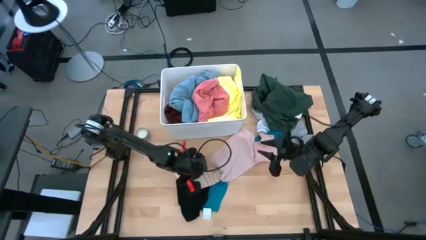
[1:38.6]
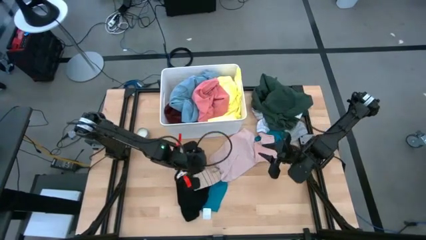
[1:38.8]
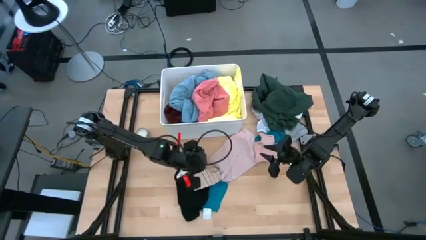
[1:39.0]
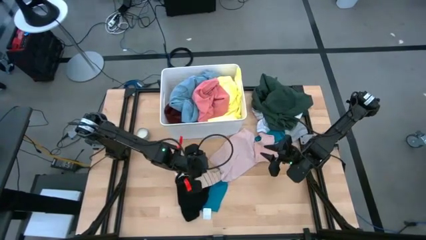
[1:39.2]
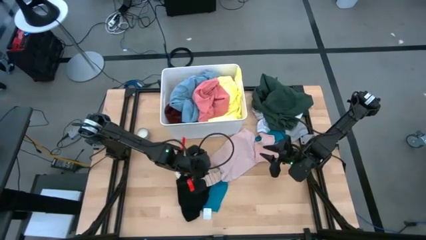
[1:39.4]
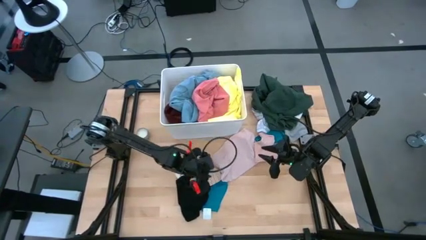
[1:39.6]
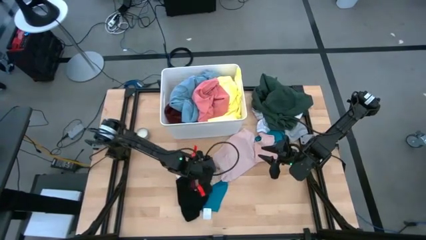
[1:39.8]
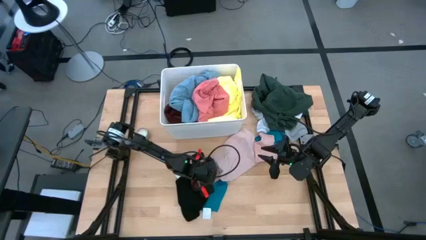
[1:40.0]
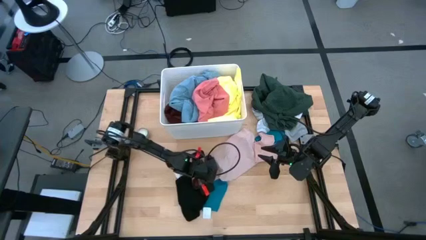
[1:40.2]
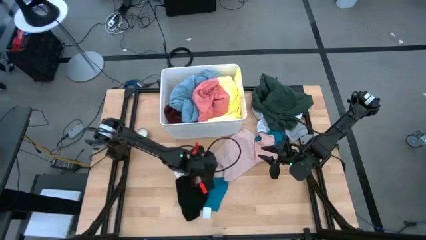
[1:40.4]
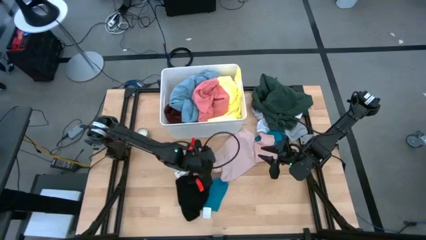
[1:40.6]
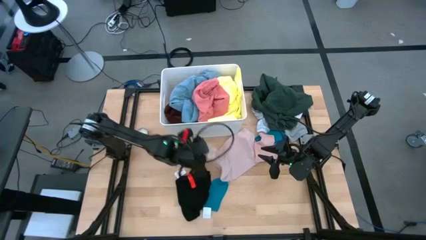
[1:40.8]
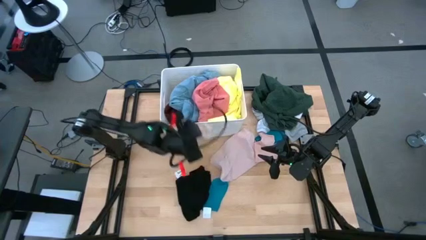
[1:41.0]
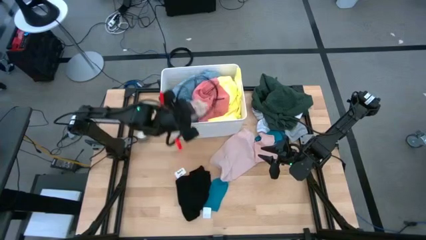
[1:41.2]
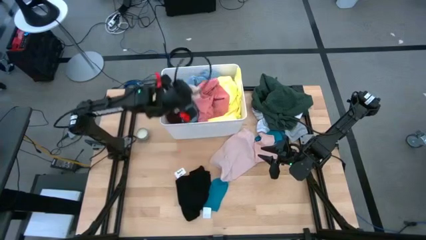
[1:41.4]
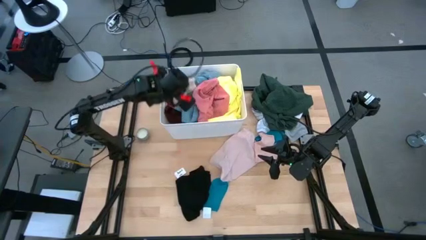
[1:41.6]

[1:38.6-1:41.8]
Task: Sort clothes
Put the brown patterned sock into the laundry bin

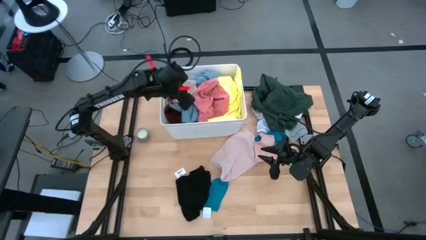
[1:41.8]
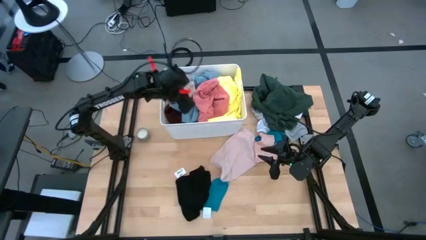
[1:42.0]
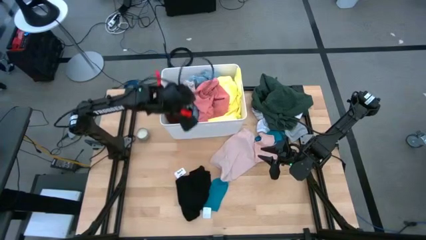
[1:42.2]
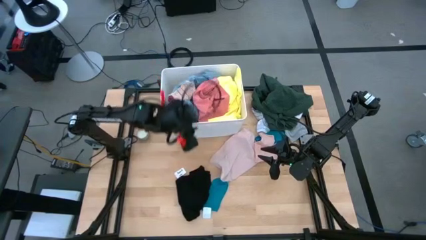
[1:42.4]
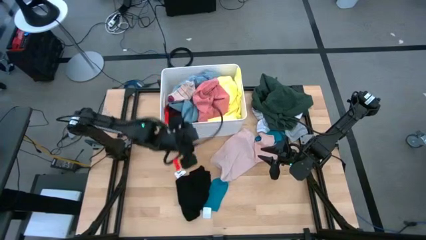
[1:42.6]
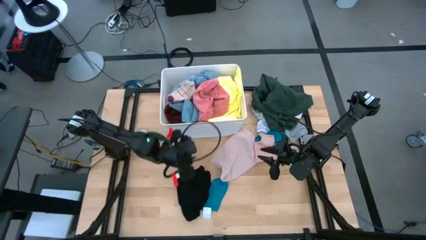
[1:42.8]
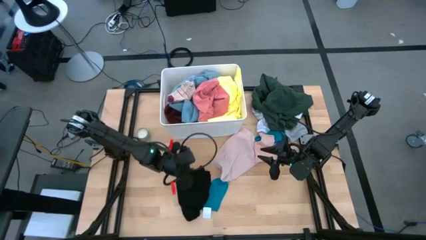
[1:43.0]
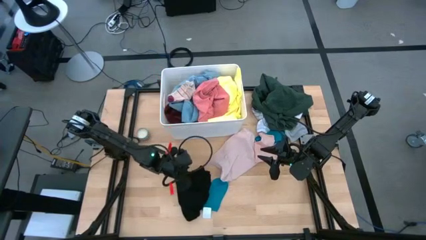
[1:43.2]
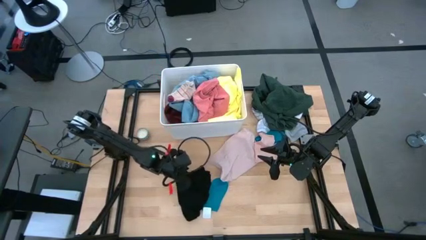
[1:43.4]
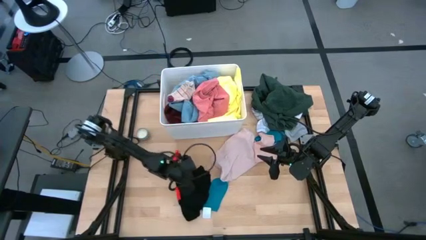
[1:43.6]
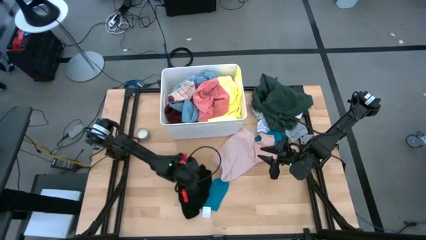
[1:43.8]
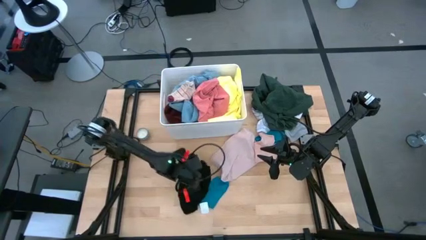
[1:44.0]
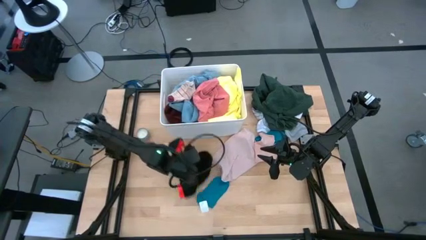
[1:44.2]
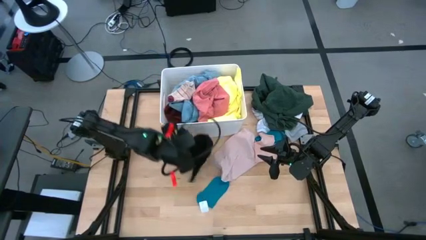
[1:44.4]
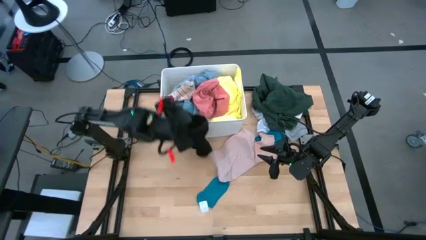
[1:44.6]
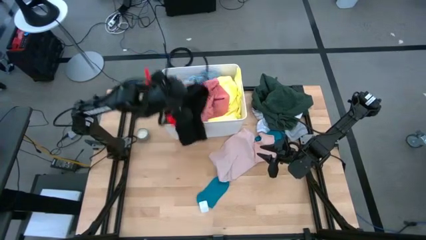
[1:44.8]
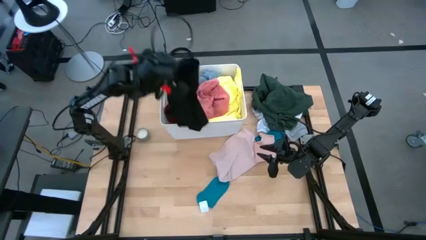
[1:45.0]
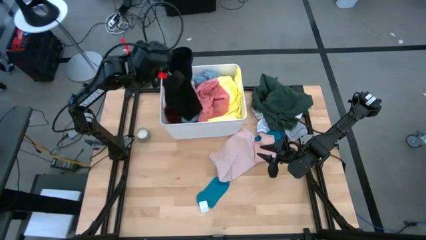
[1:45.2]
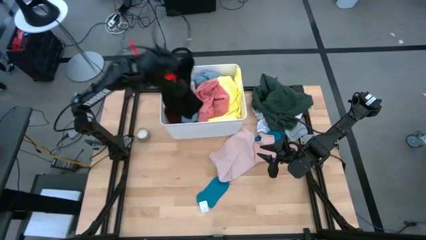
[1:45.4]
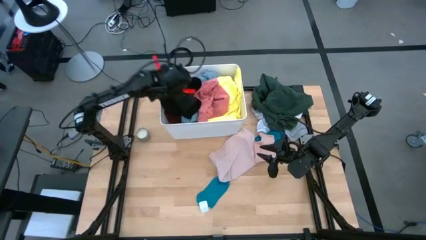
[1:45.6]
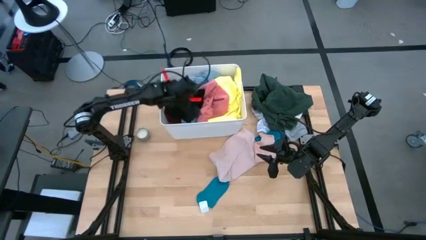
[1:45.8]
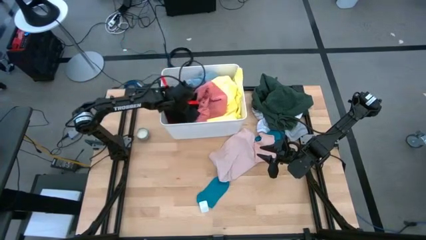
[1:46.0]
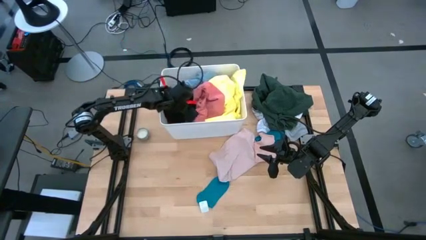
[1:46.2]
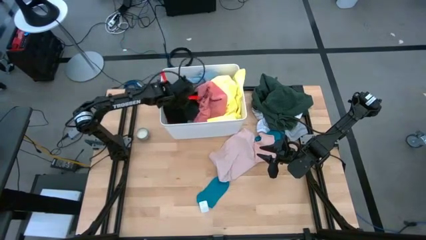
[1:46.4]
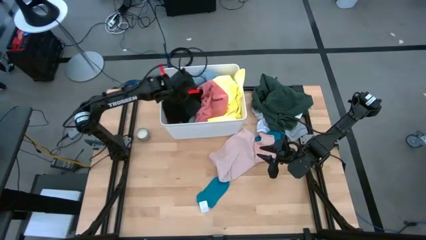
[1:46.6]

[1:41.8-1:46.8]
Put the black shorts into the laundry bin

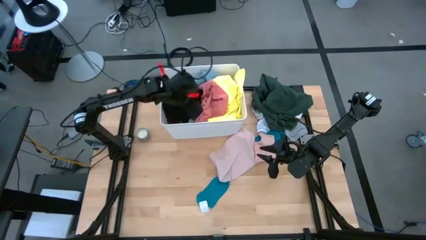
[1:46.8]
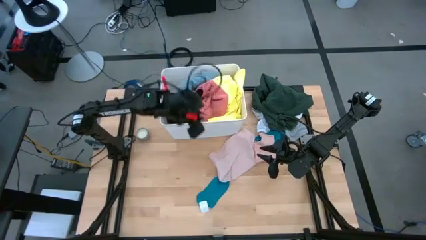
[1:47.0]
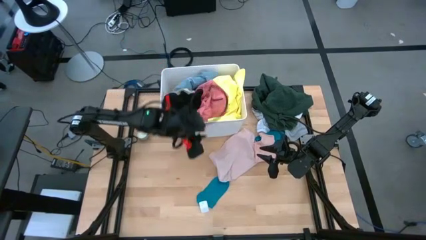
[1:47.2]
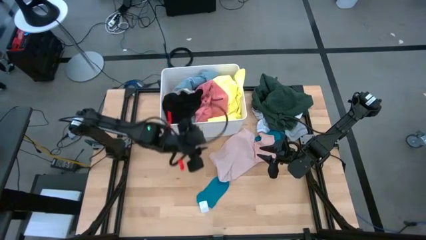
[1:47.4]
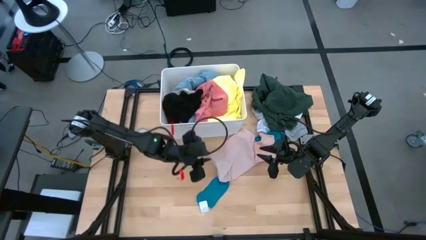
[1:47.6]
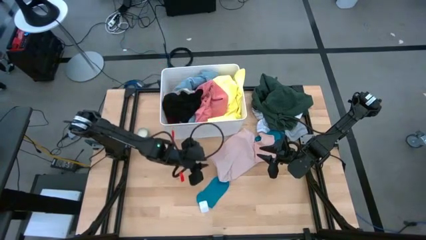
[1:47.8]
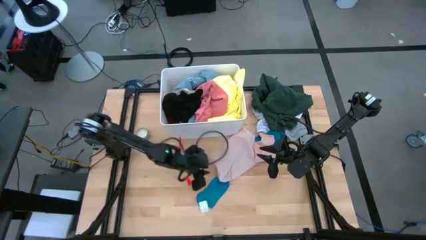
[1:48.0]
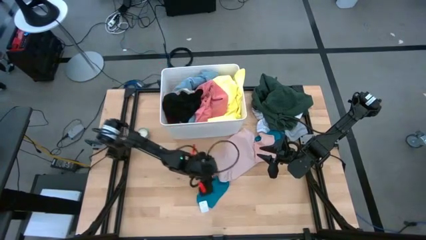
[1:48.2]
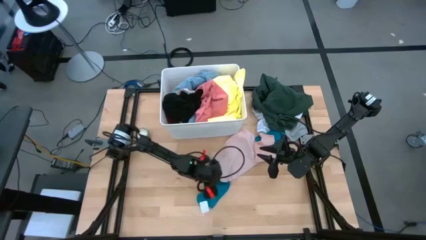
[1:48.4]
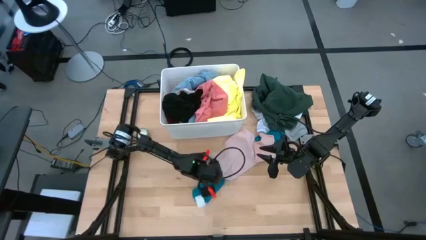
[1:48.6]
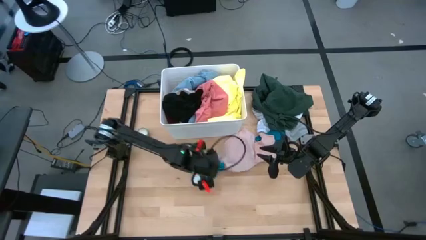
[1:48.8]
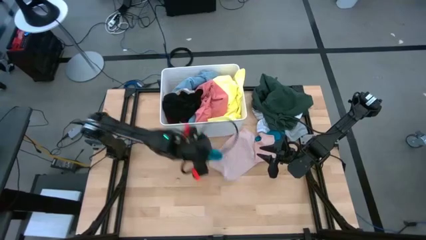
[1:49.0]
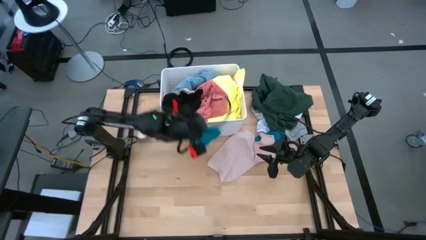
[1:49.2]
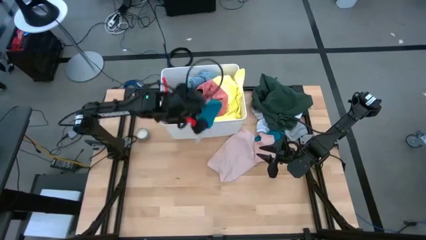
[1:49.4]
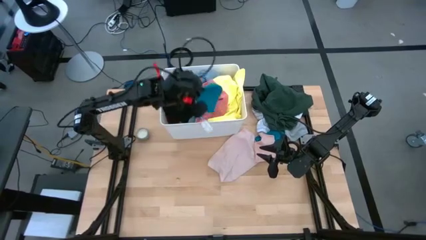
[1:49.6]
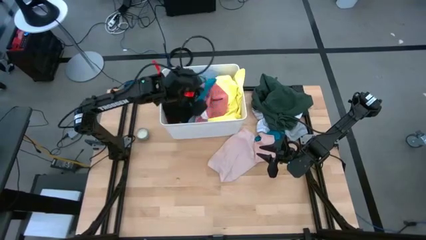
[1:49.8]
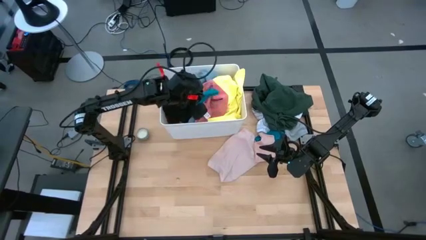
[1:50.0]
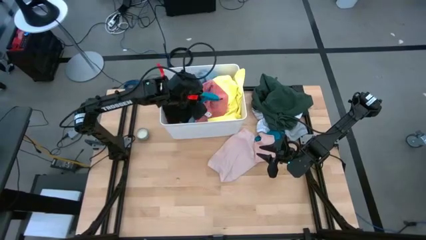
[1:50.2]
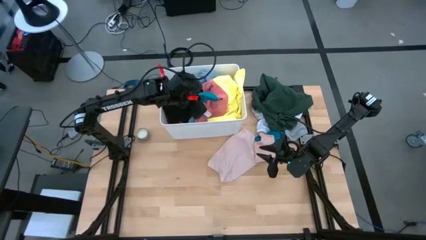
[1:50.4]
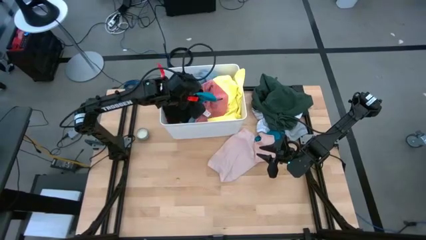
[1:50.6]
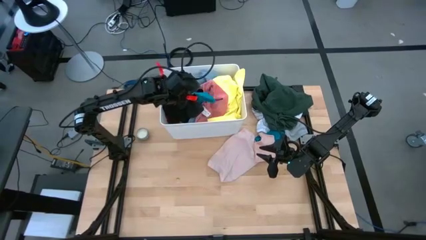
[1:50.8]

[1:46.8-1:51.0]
Put the blue sock into the laundry bin

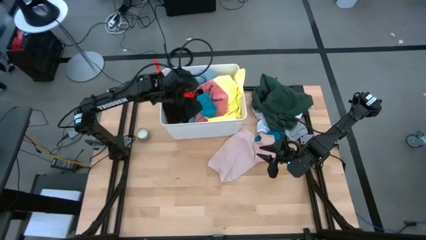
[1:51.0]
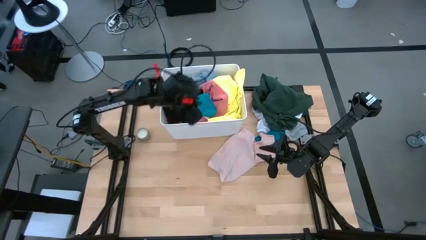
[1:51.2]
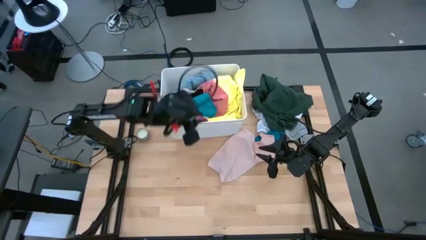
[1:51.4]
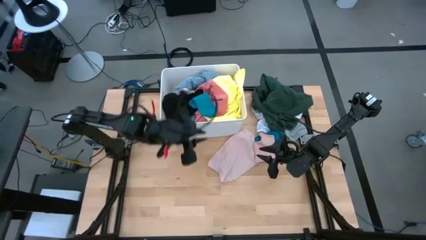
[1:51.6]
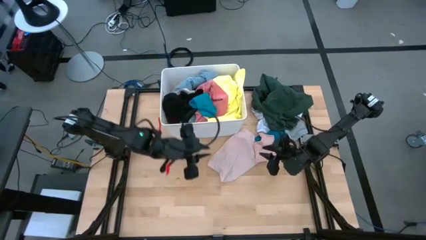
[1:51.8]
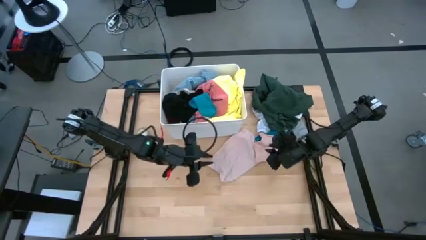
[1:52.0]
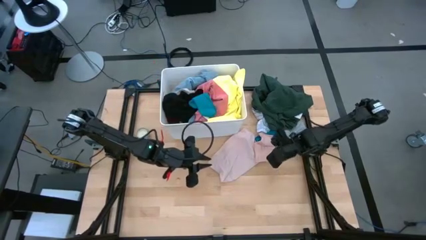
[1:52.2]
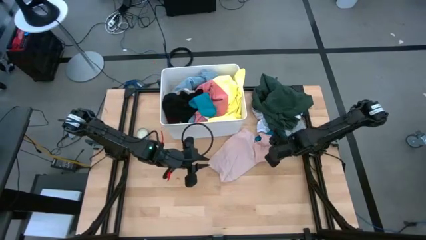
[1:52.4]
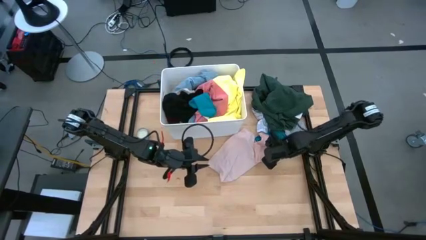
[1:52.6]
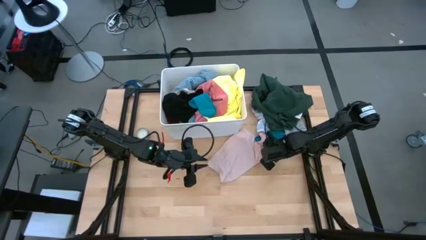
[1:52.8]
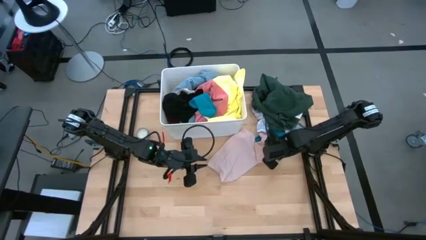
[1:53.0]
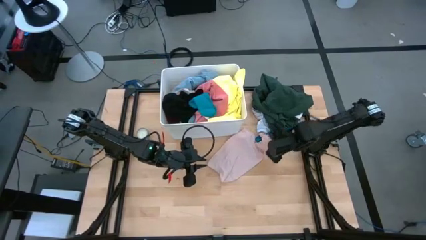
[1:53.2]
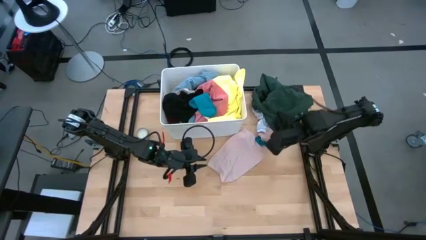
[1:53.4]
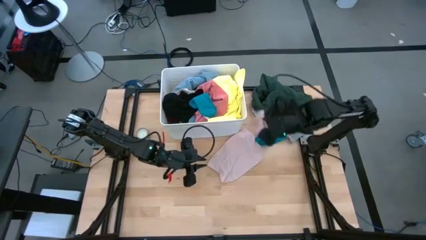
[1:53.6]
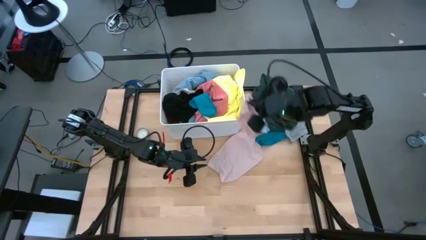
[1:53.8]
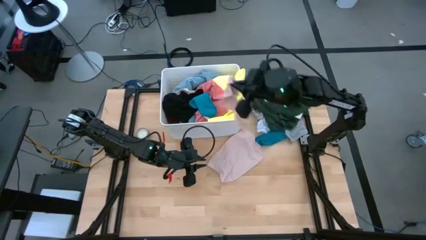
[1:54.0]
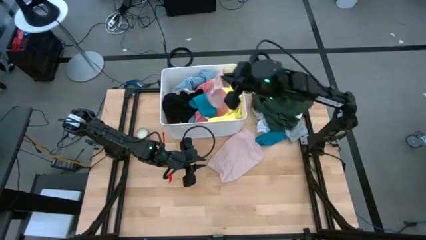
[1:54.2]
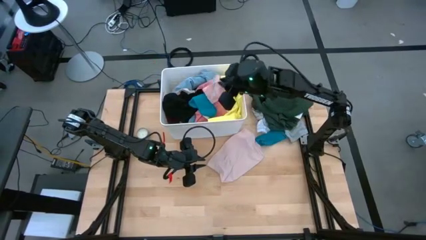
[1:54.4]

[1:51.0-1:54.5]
Put the pink sock into the laundry bin
